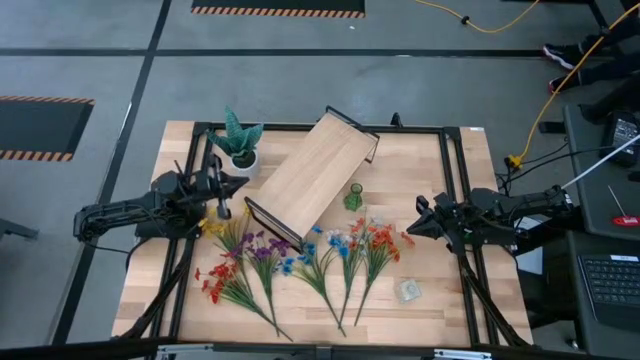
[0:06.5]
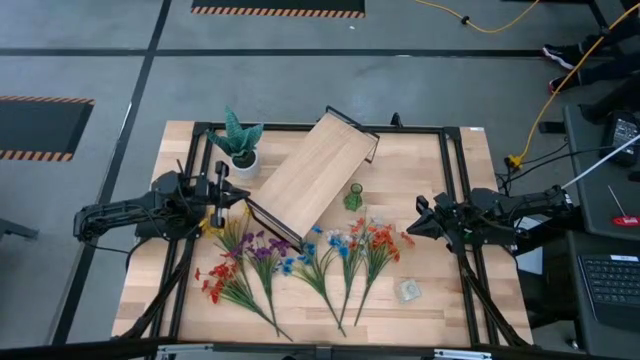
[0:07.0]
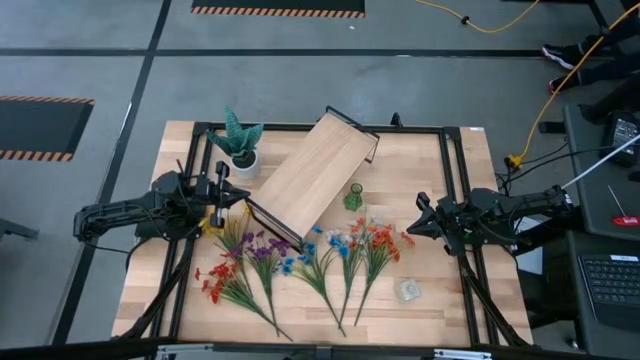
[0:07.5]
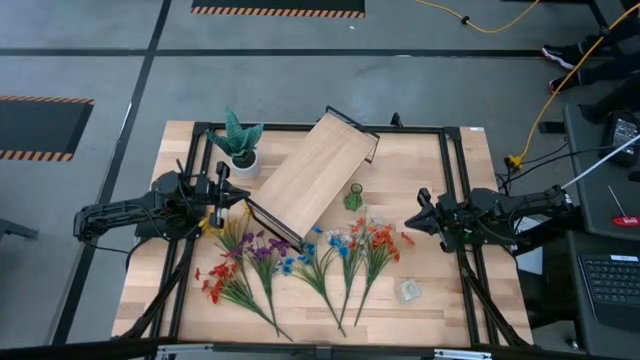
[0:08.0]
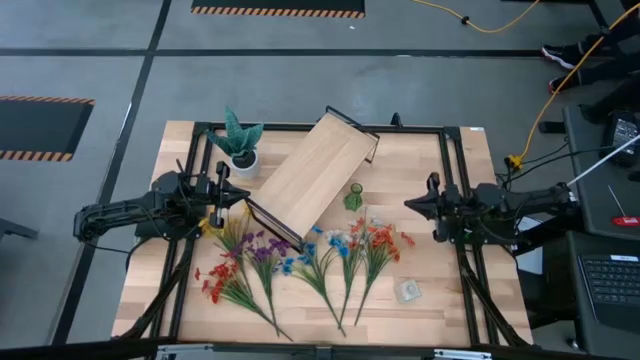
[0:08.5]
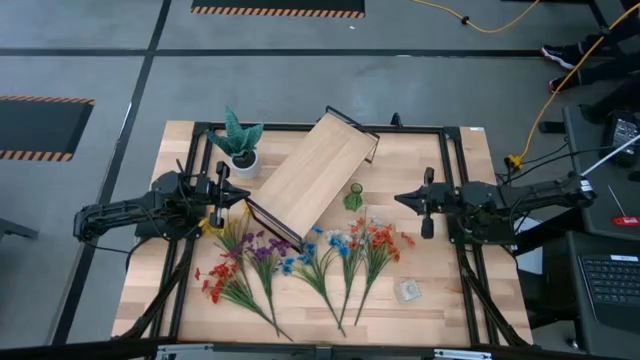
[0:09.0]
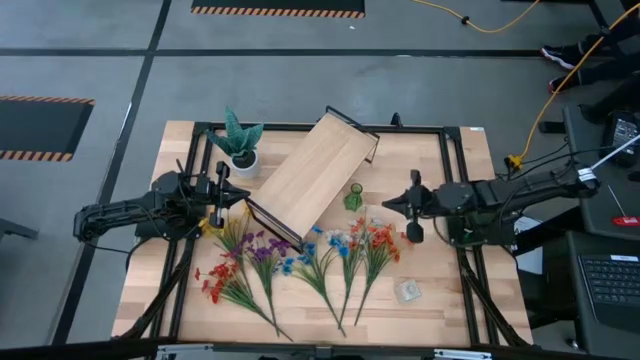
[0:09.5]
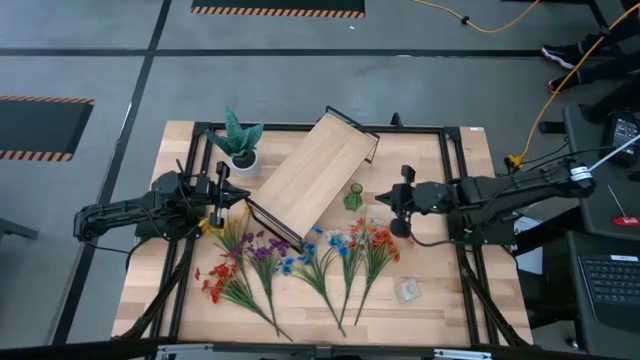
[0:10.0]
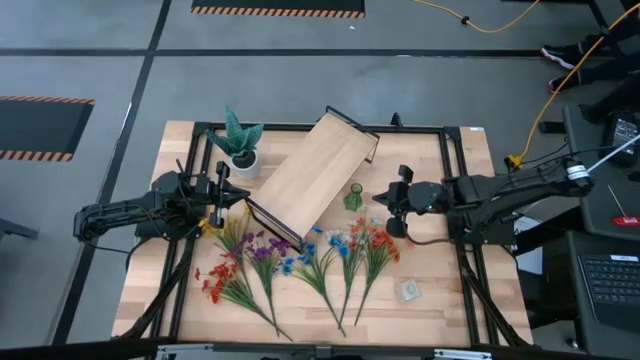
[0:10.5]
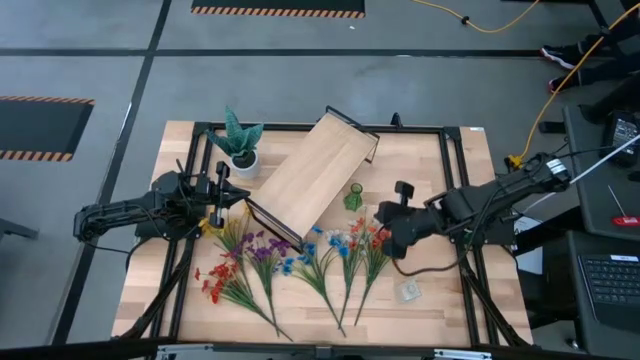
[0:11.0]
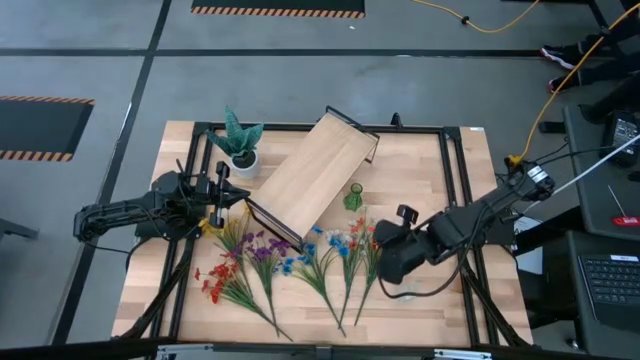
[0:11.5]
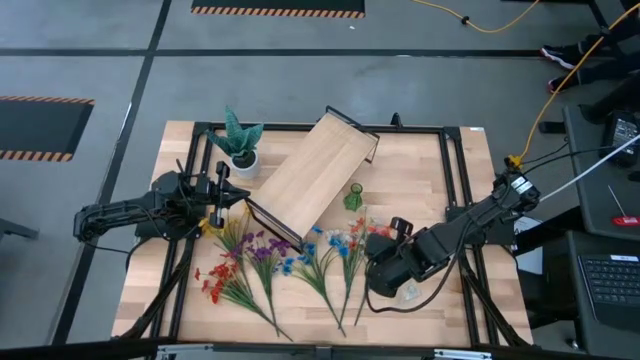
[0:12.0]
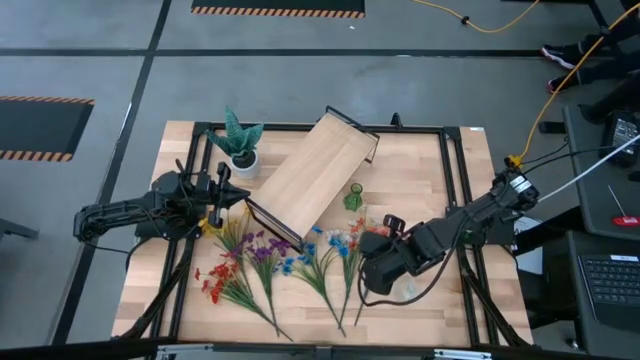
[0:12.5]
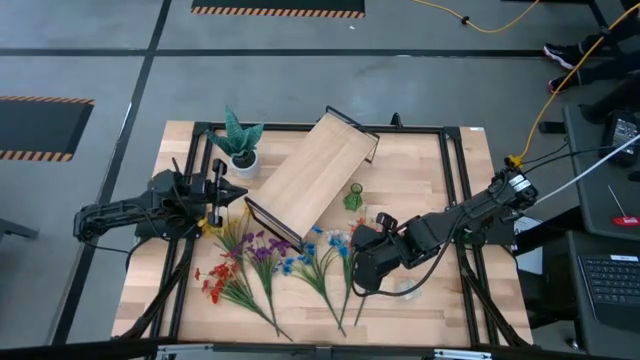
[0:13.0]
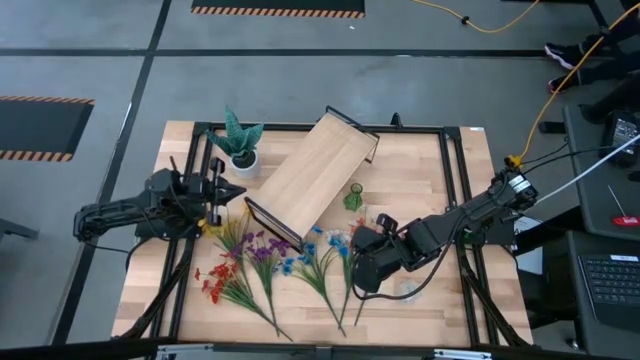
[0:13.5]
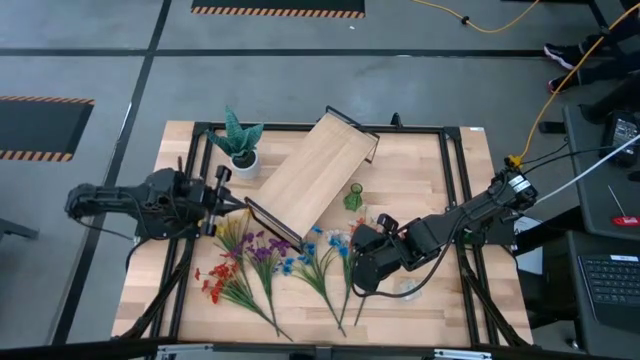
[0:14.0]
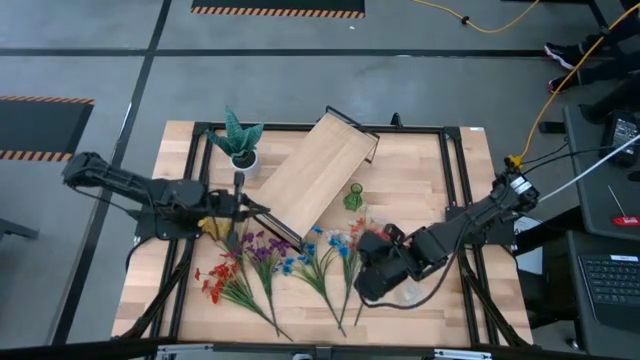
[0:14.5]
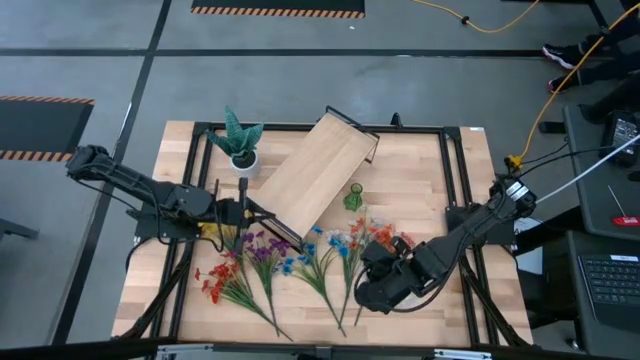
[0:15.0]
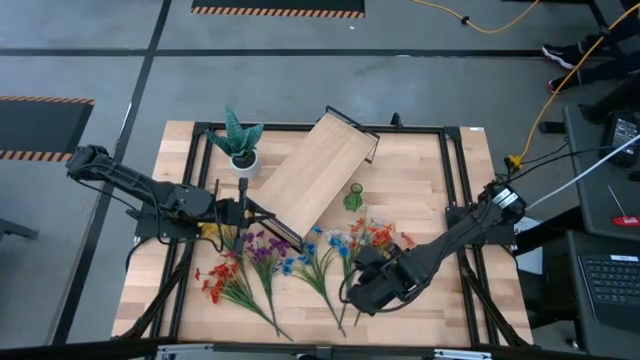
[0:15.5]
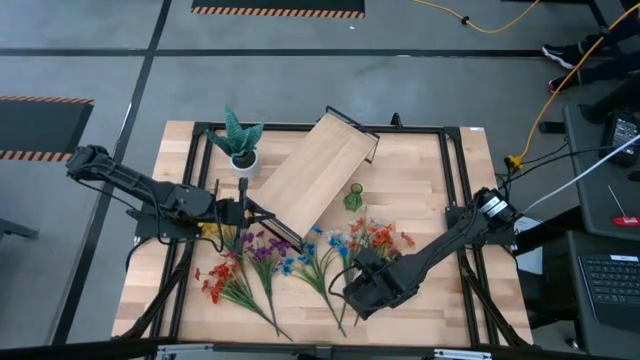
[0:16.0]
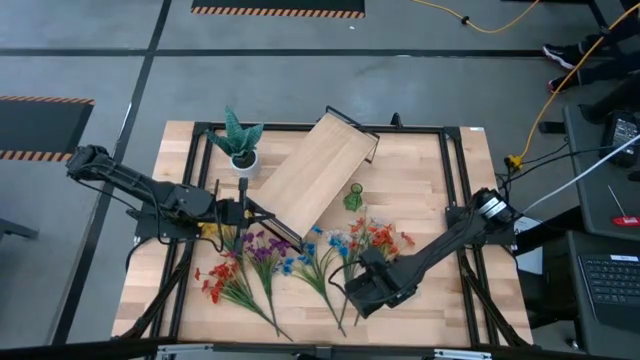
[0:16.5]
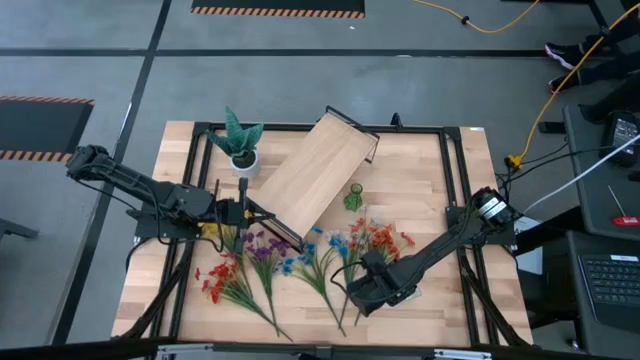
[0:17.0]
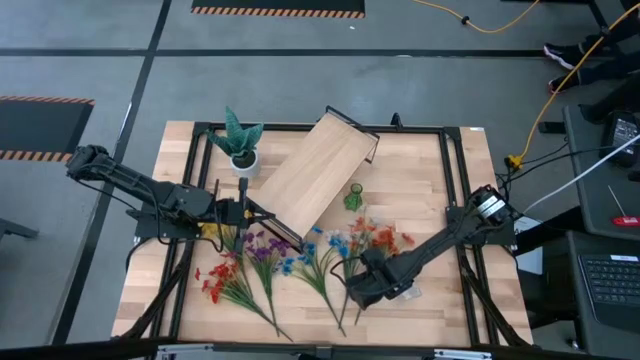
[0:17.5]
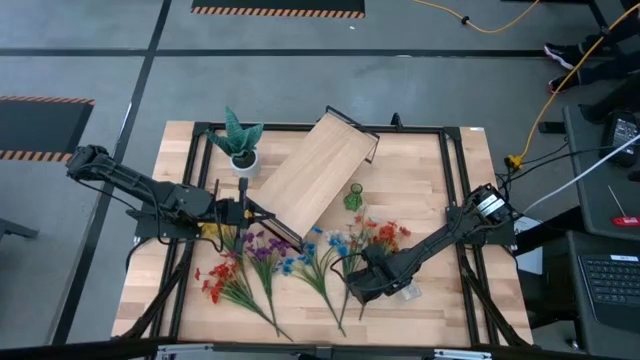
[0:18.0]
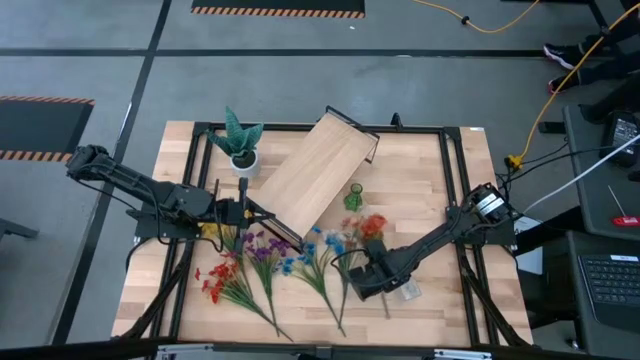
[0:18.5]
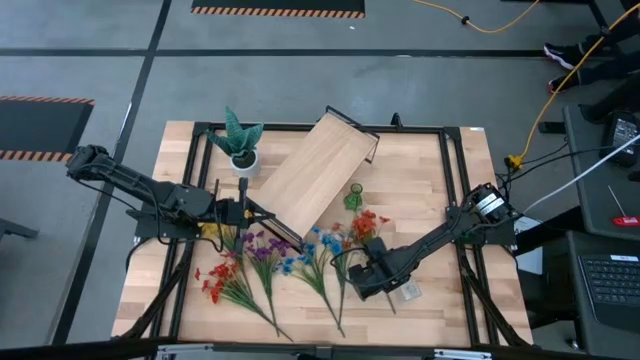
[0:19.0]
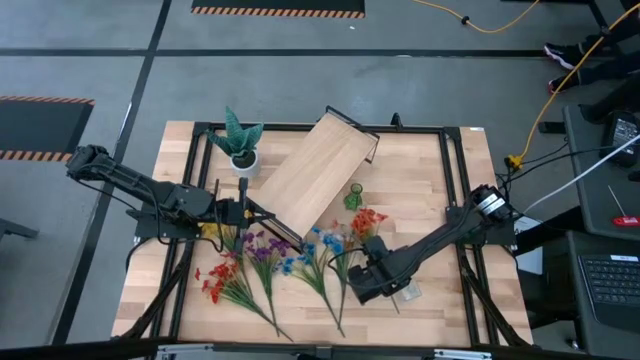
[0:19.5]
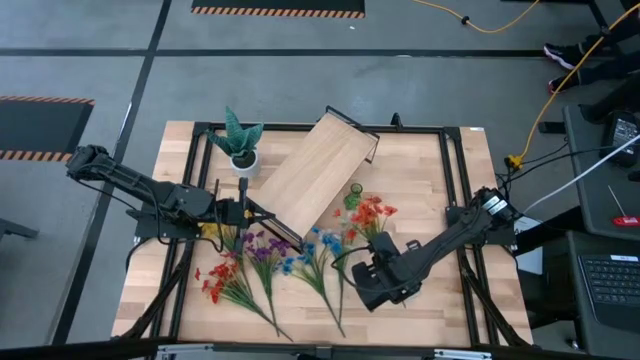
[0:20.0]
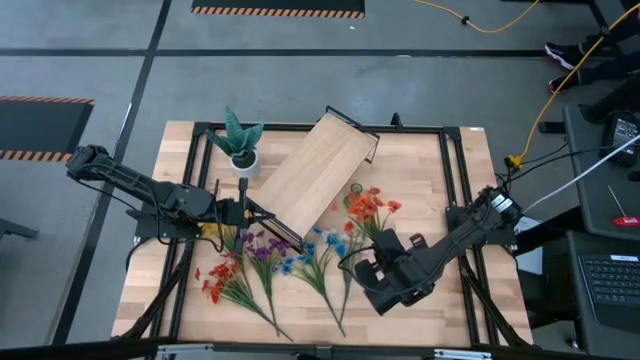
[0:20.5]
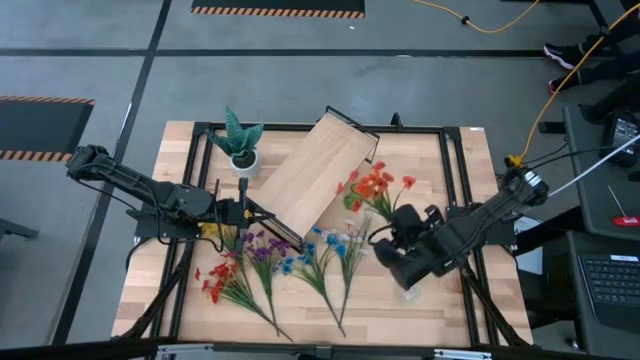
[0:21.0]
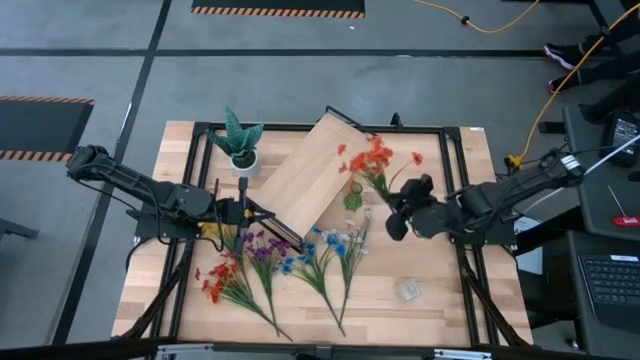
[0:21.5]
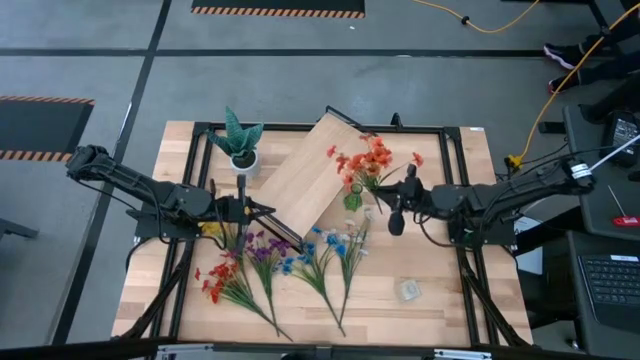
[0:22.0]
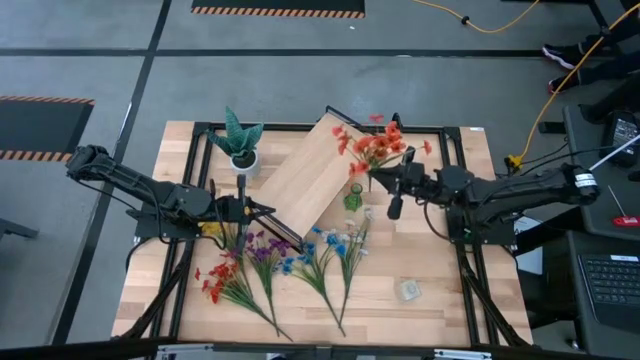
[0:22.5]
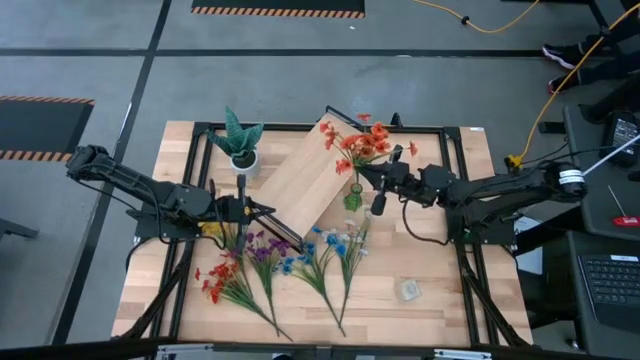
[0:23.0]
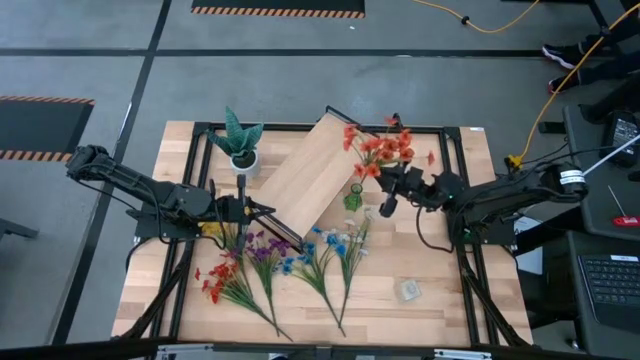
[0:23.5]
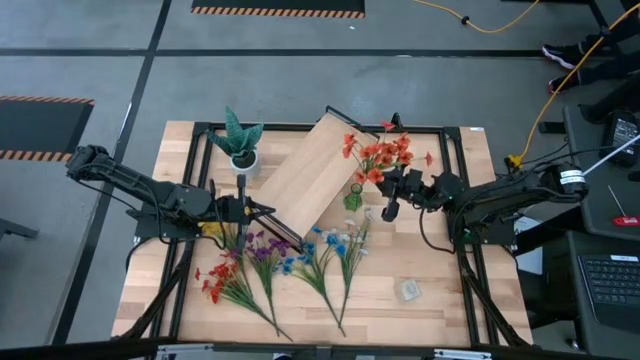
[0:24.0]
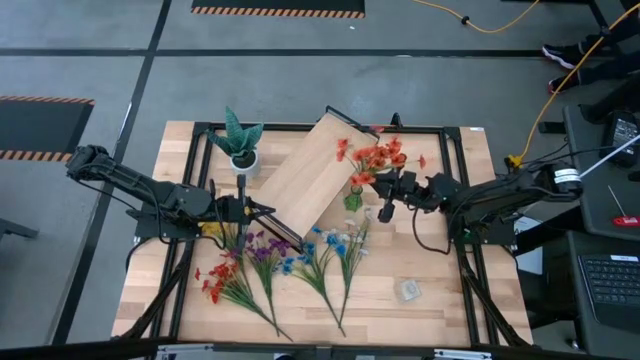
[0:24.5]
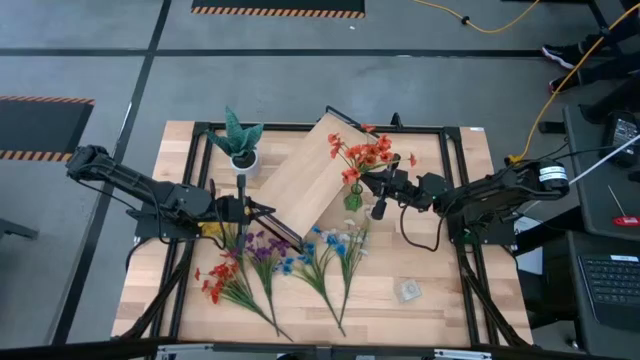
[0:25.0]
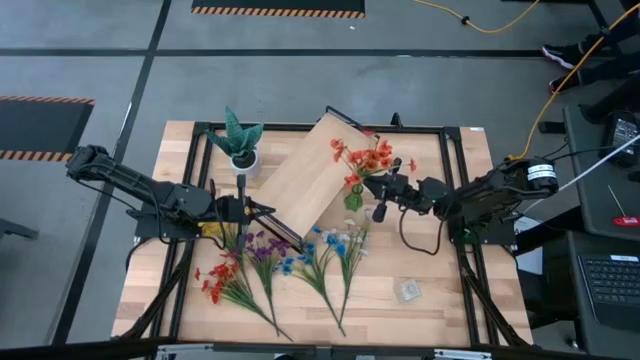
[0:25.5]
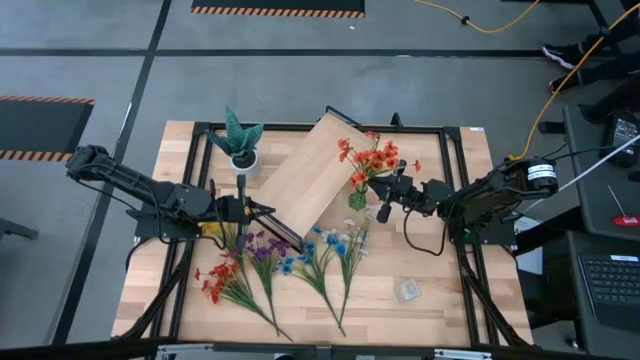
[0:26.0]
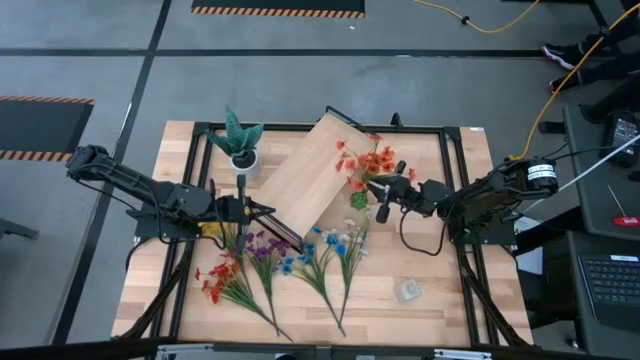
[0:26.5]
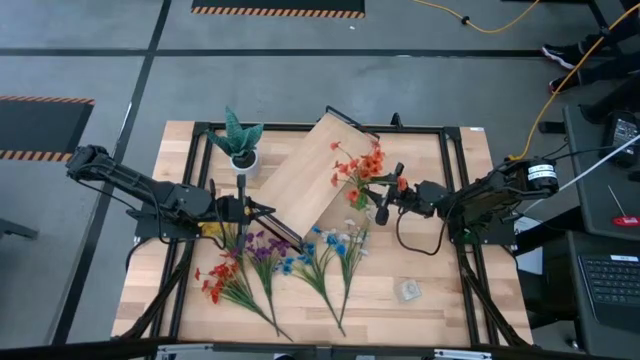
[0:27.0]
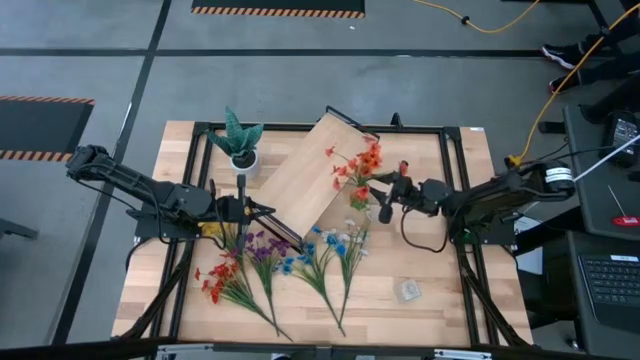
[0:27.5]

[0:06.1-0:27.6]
Task: Pick and place flowers into a vace then onto a shelf
Put the orange flowers into the green vase
